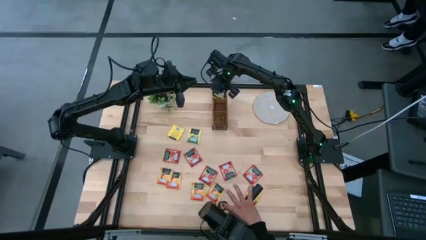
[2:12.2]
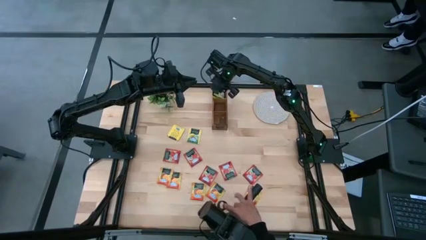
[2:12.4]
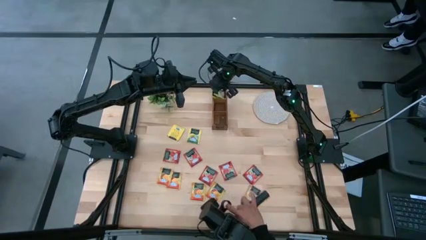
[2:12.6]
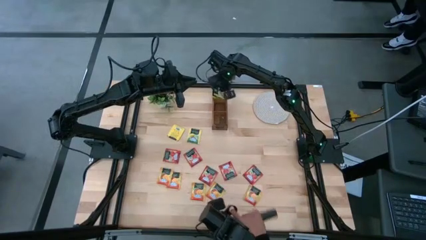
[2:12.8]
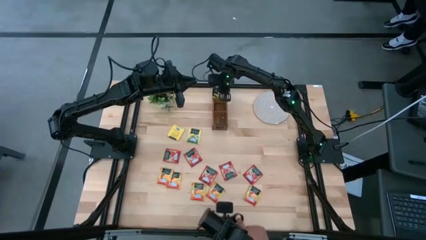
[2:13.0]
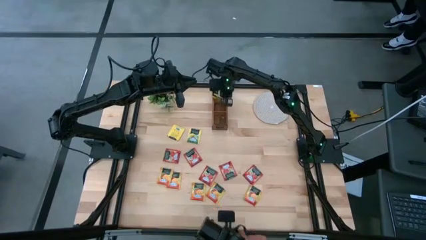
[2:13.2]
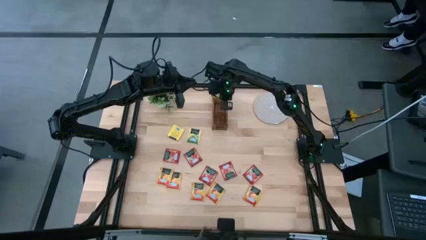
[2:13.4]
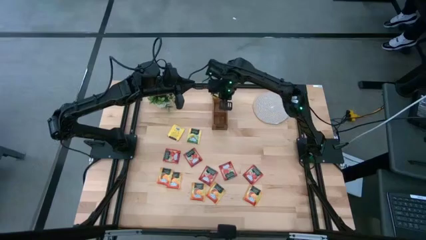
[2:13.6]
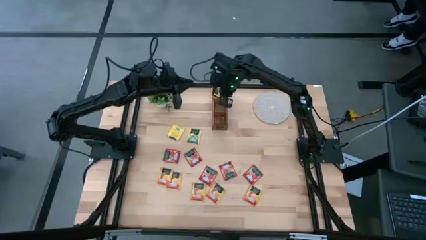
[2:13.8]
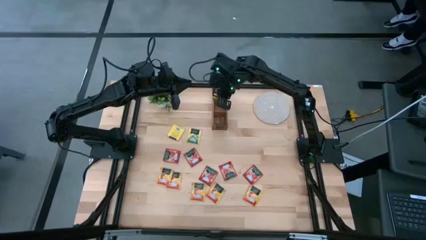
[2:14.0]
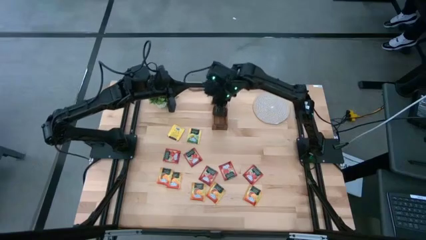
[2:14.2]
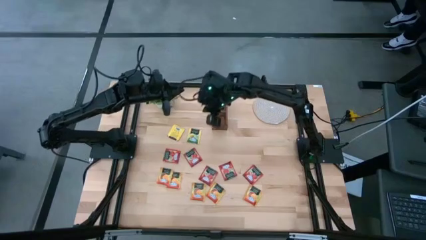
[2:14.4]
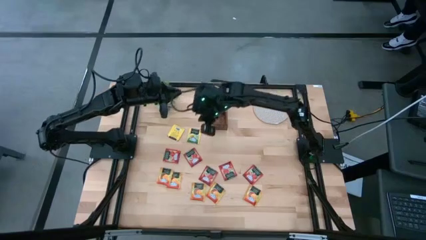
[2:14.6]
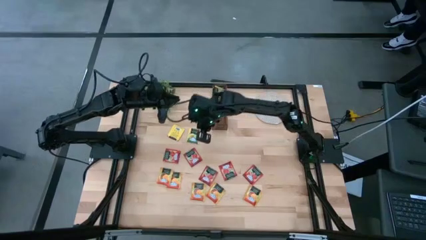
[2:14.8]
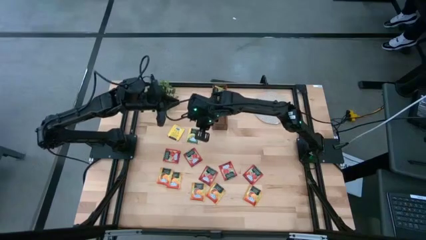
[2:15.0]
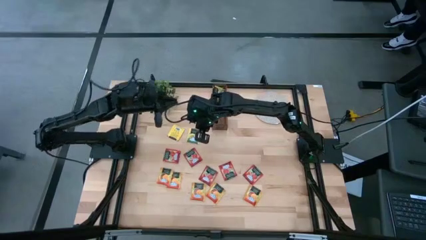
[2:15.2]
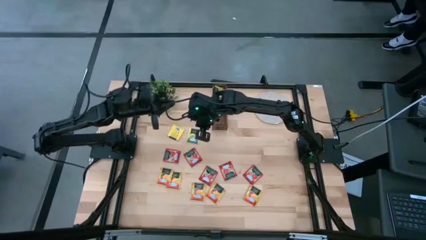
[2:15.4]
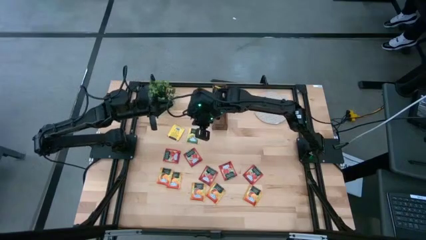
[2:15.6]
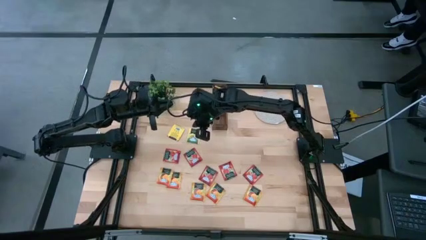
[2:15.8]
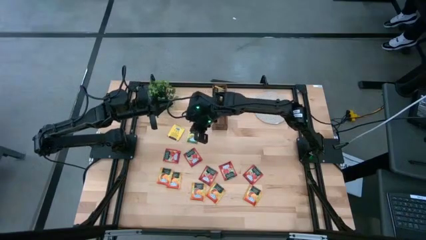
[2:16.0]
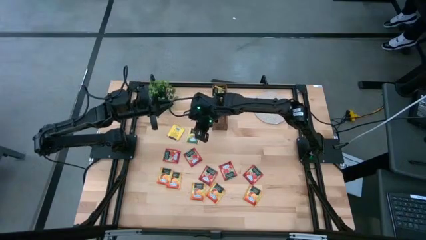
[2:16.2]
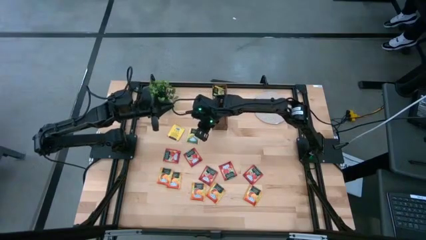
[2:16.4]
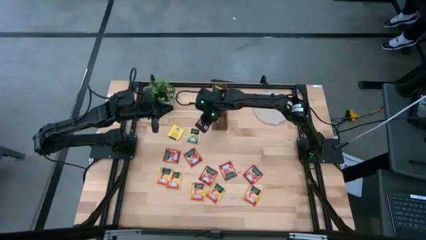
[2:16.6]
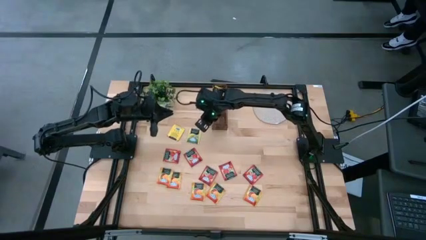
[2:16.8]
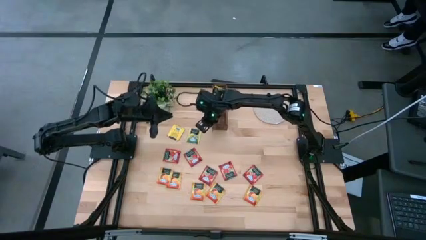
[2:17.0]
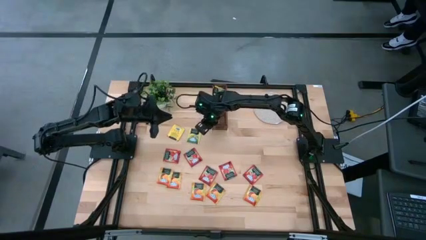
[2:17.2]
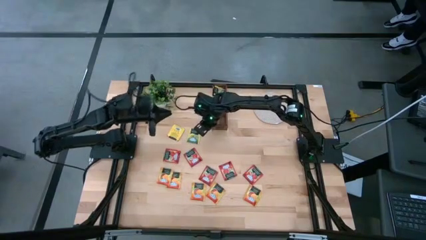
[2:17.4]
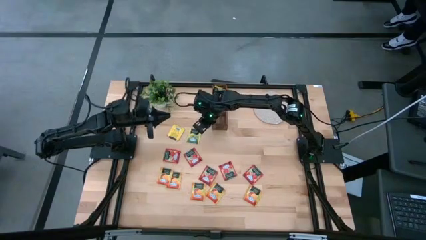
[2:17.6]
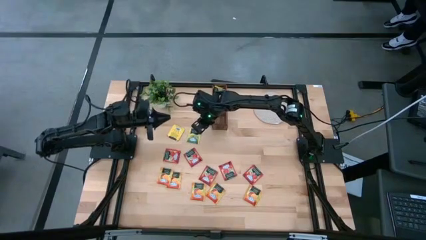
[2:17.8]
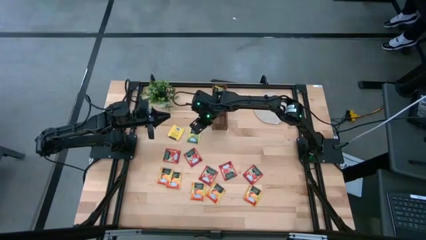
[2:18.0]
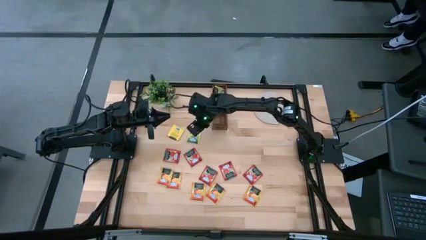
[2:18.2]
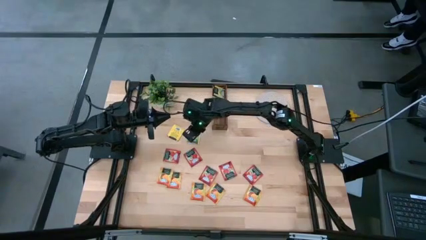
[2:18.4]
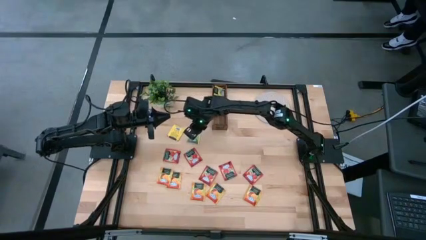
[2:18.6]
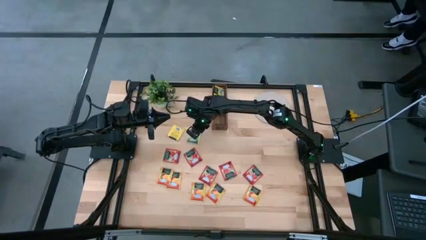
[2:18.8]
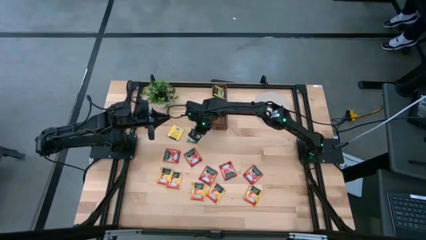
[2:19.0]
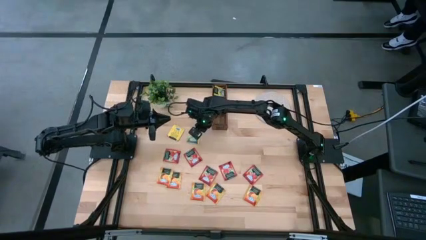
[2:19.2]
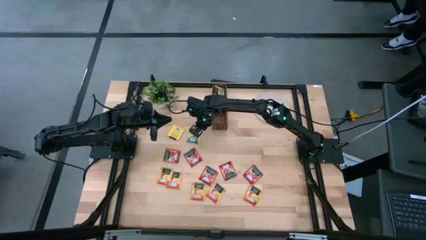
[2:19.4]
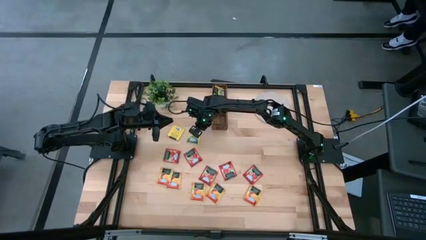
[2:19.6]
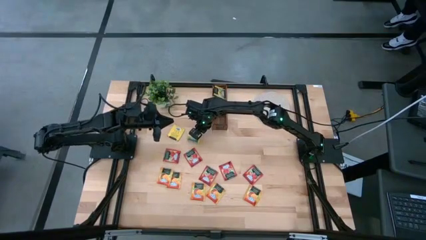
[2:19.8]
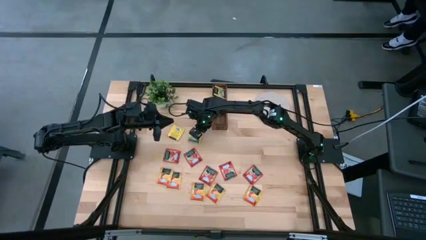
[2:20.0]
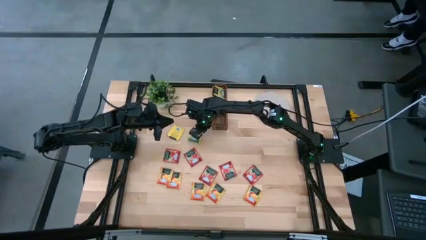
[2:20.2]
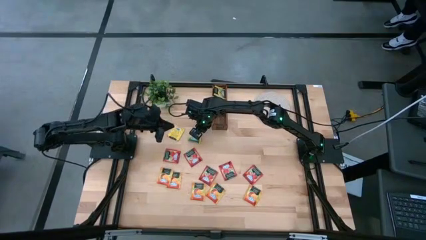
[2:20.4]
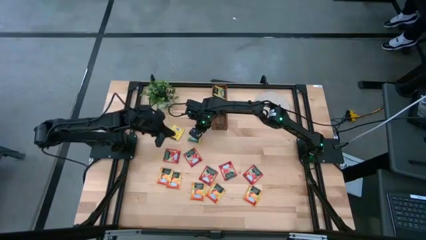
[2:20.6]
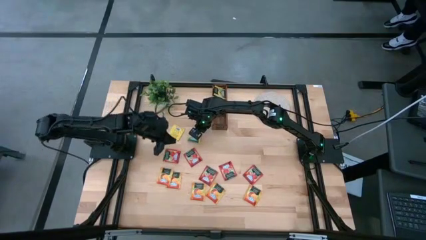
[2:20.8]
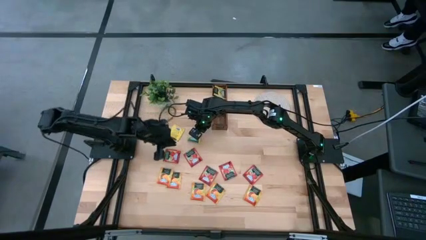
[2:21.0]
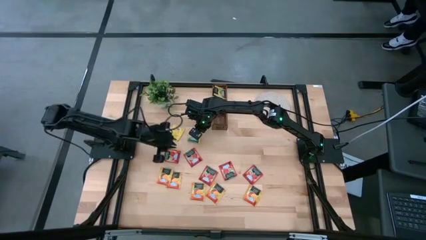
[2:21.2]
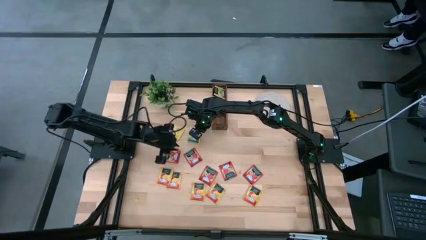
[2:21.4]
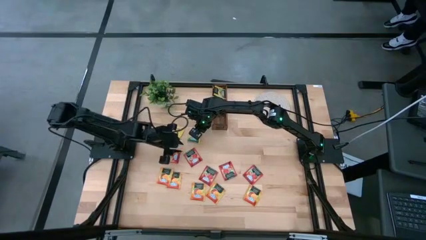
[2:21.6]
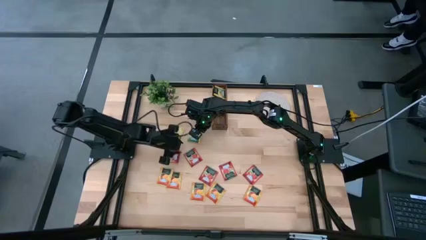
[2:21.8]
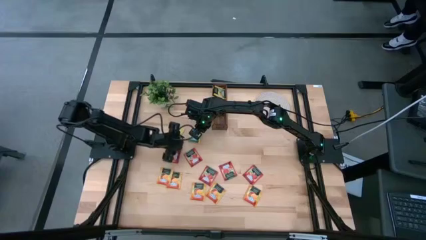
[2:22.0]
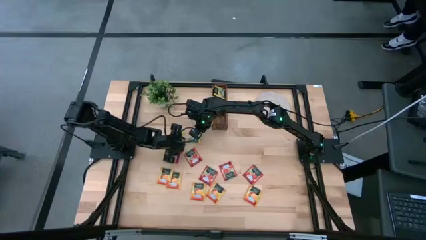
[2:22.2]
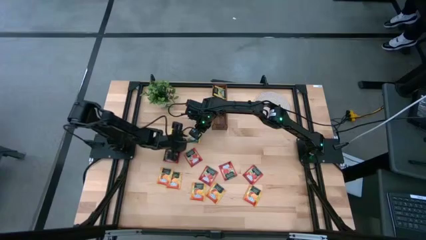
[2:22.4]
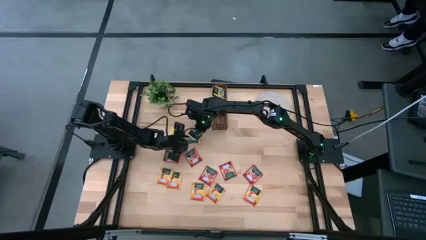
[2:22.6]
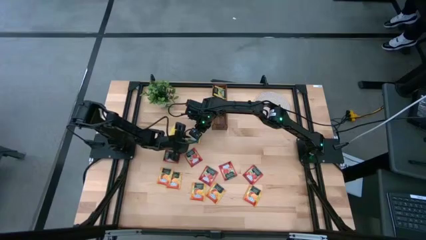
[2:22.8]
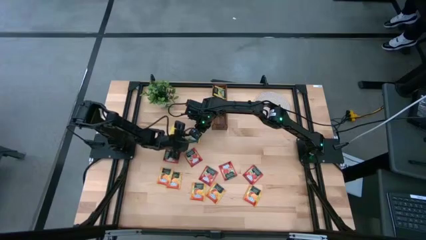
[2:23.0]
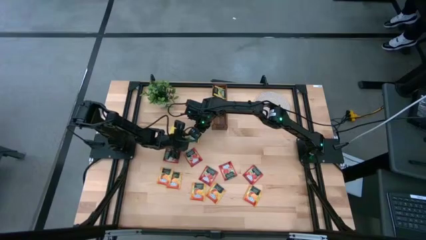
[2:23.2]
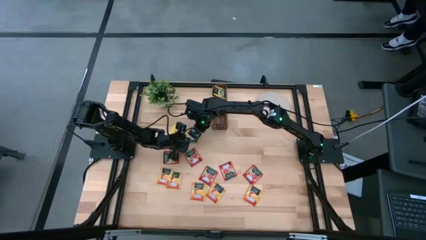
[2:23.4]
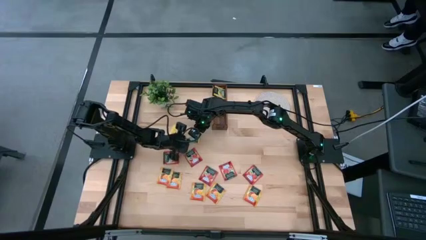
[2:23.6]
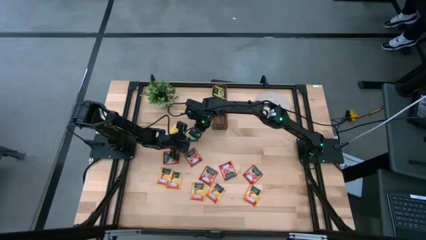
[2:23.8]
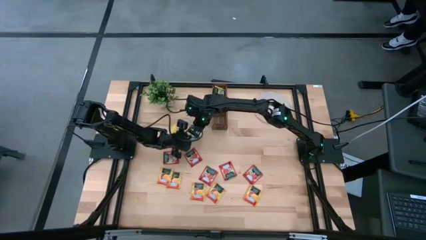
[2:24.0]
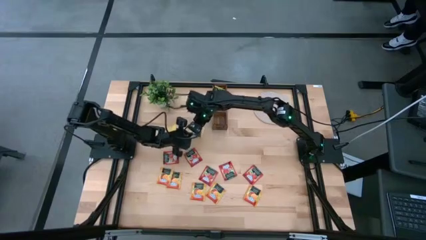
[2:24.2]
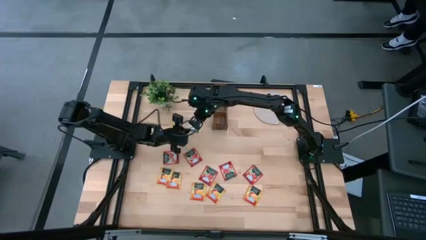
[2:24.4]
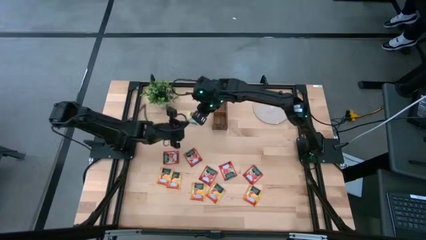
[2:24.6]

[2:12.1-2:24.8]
Task: Pick & Place Tea
Put the yellow tea bag into the left section of the wooden organizer

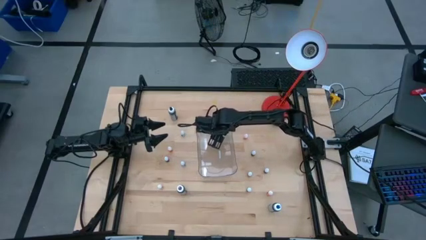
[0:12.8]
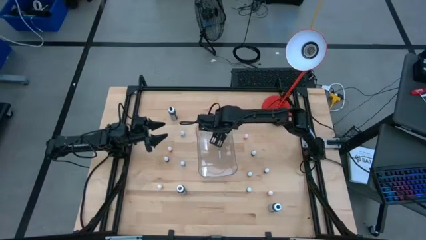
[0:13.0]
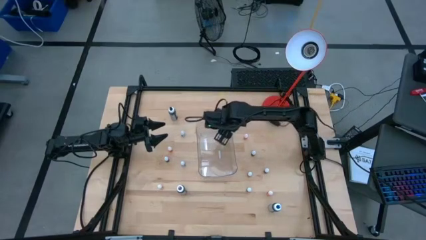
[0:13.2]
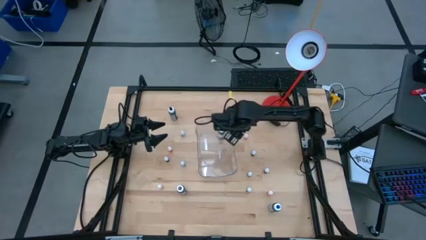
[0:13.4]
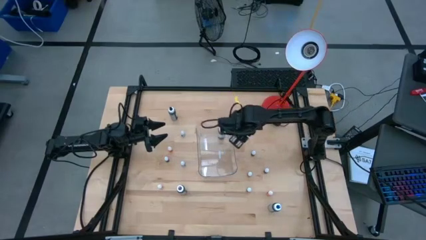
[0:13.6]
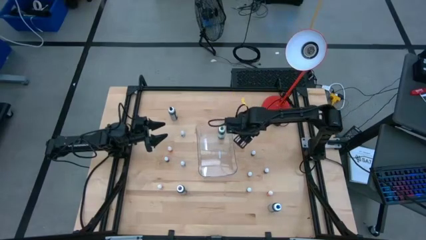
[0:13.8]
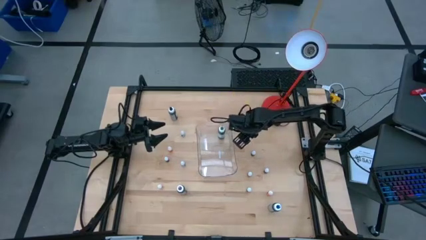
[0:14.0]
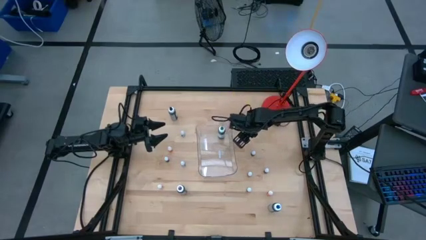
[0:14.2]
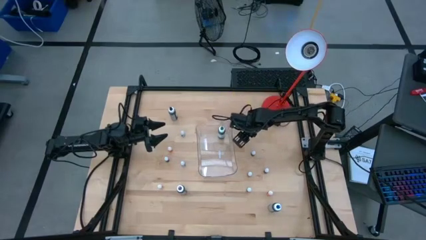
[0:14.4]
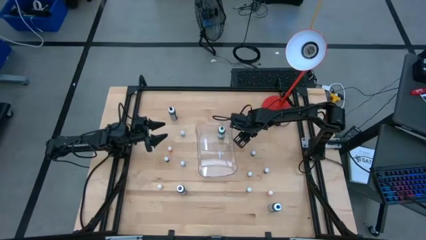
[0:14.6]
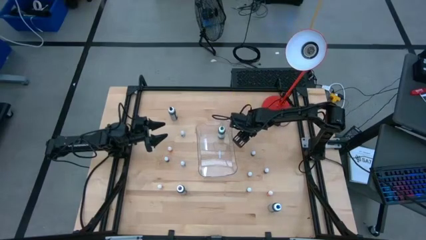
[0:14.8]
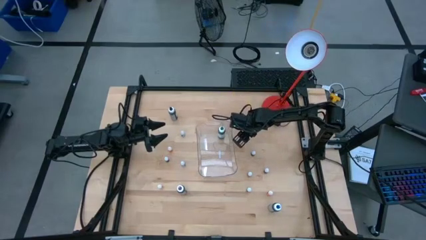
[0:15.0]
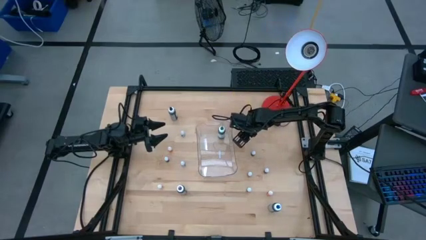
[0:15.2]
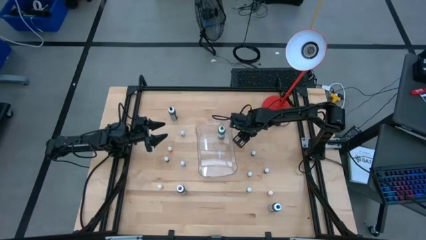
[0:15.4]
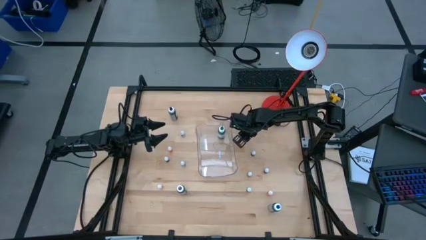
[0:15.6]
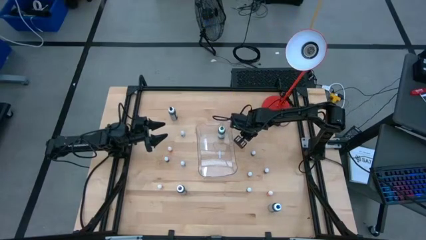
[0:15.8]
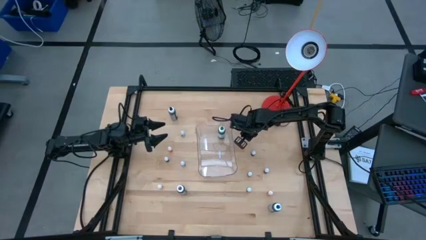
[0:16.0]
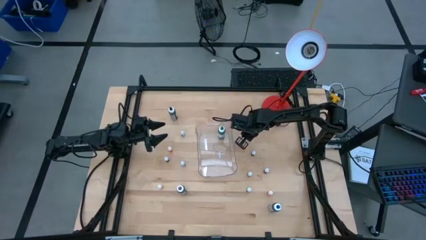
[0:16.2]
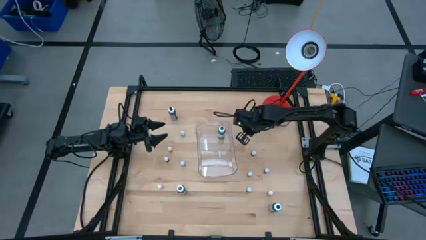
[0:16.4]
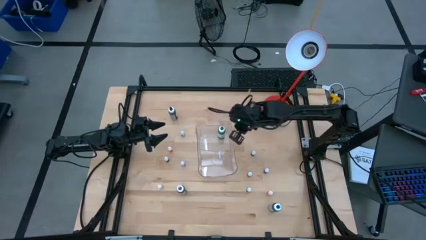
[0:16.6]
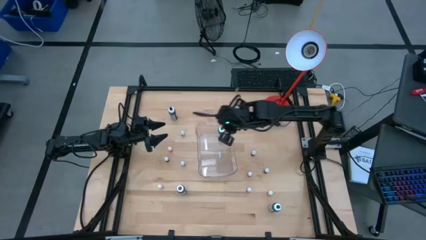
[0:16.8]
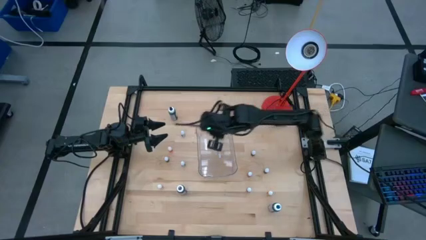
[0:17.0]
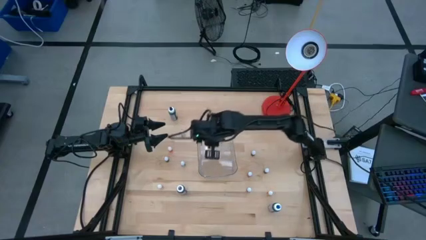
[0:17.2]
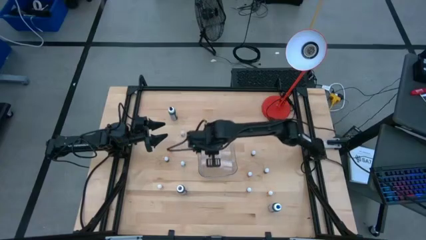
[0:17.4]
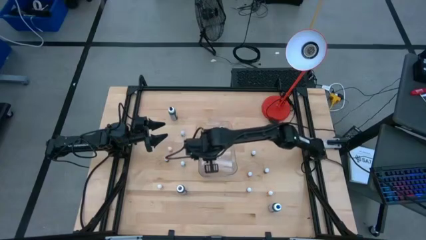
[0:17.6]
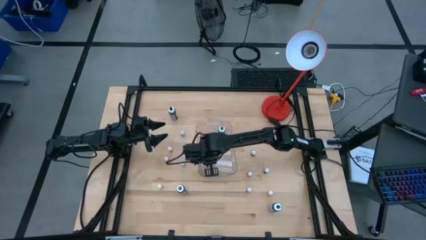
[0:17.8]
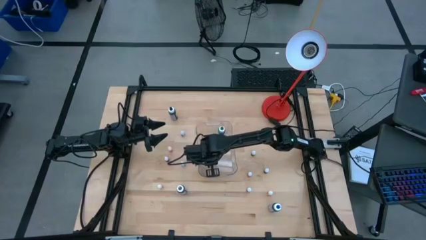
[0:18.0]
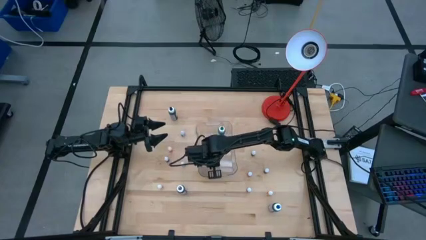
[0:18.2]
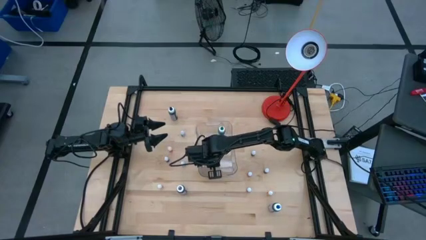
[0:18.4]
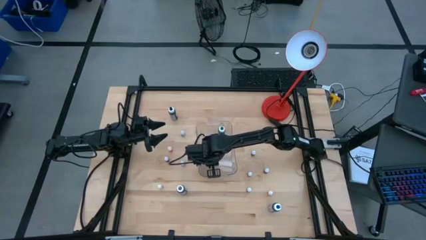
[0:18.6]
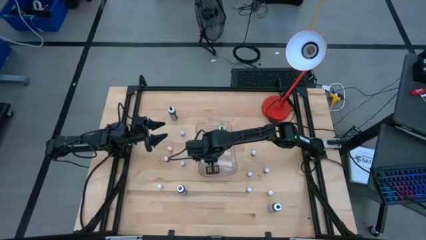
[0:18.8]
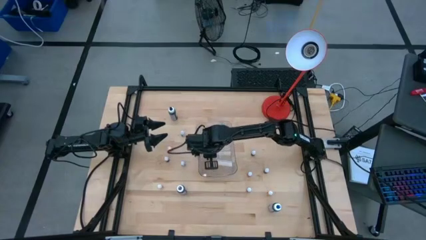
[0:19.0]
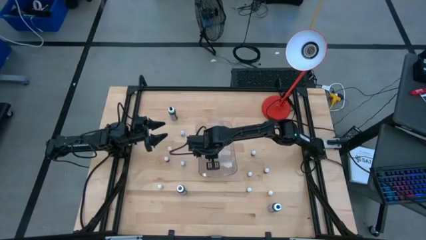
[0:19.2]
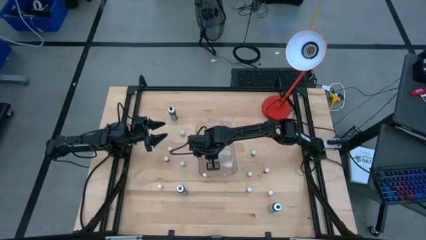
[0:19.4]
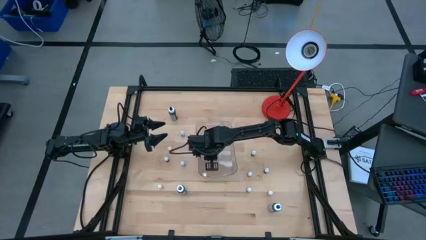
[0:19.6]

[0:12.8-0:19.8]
Task: Pick & Place food coloring
Put the small yellow food coloring bottle into the transparent bin
